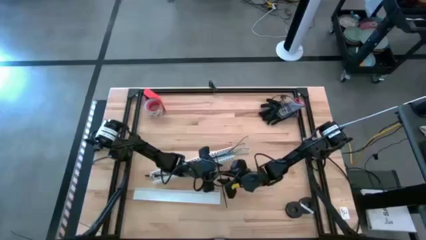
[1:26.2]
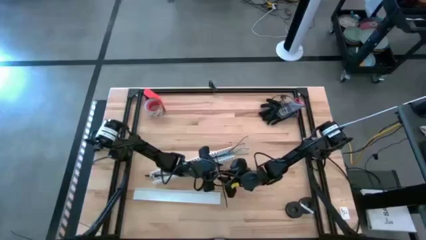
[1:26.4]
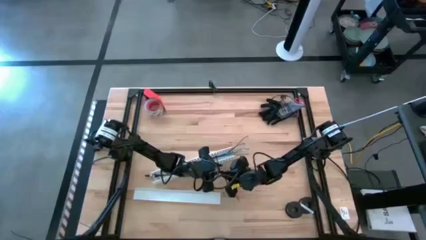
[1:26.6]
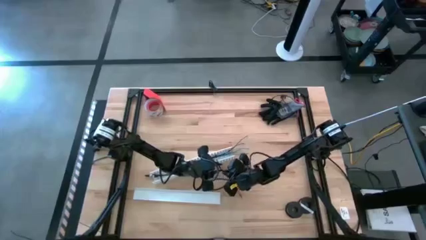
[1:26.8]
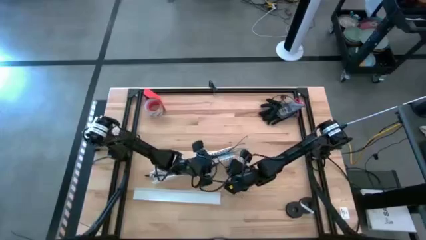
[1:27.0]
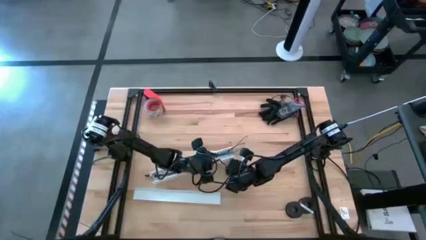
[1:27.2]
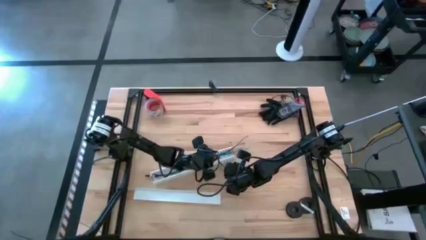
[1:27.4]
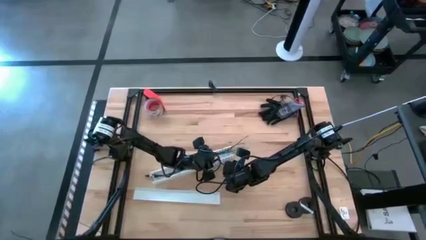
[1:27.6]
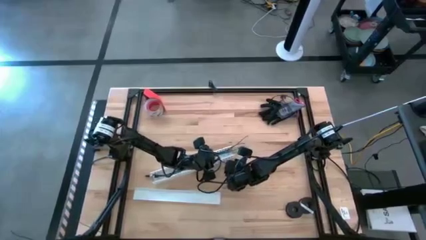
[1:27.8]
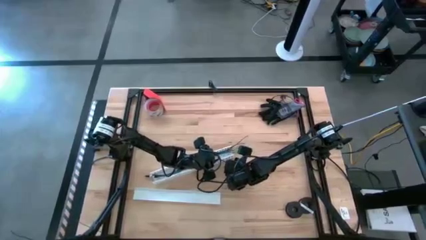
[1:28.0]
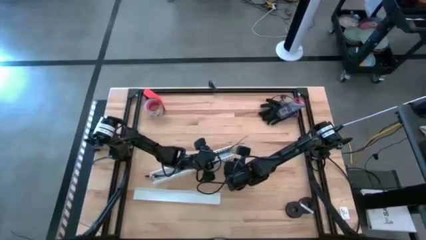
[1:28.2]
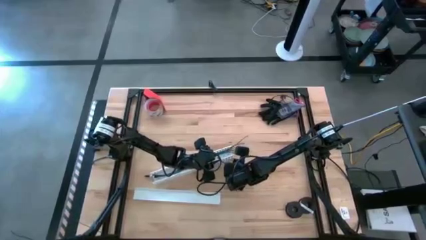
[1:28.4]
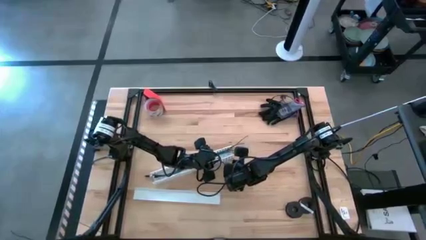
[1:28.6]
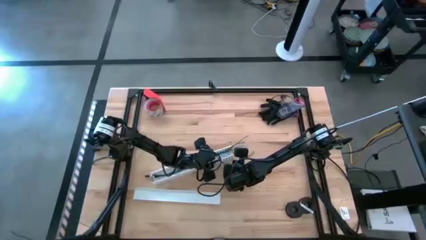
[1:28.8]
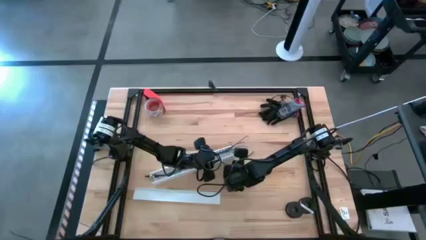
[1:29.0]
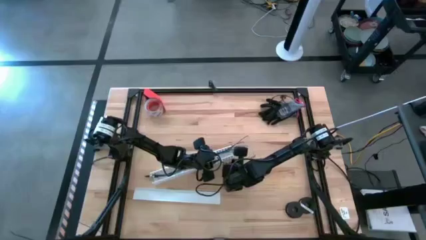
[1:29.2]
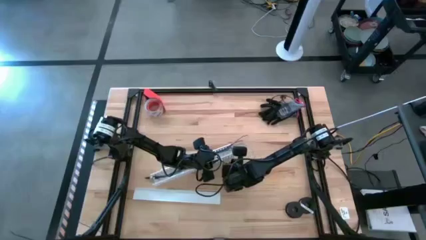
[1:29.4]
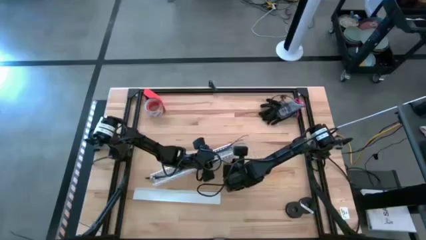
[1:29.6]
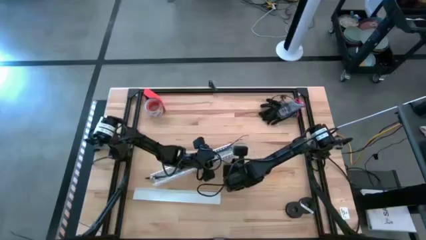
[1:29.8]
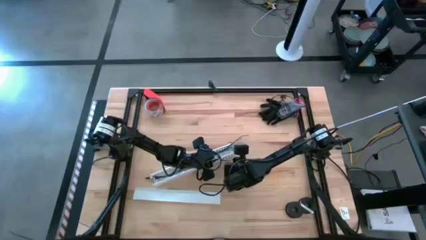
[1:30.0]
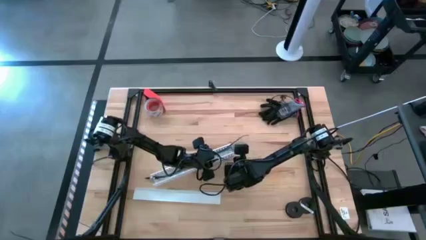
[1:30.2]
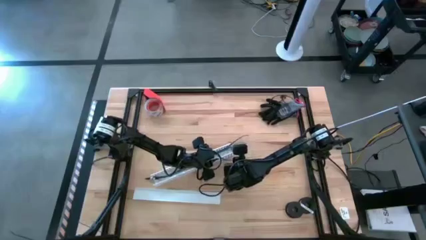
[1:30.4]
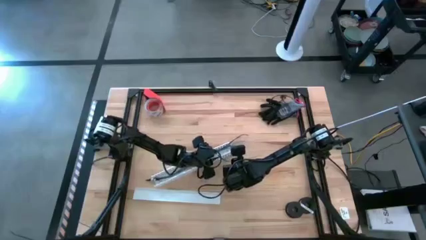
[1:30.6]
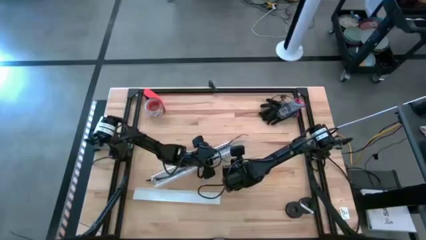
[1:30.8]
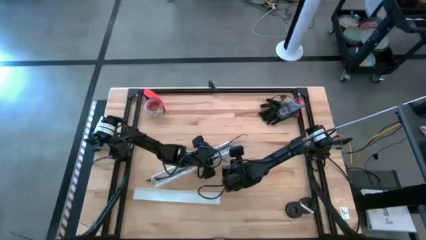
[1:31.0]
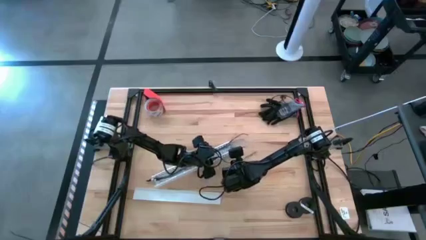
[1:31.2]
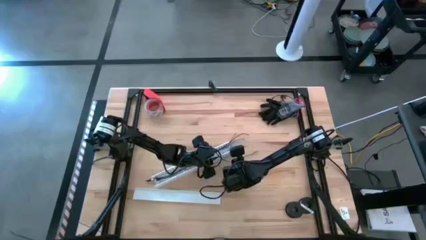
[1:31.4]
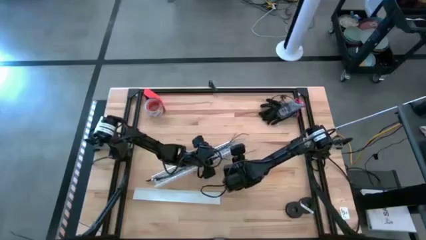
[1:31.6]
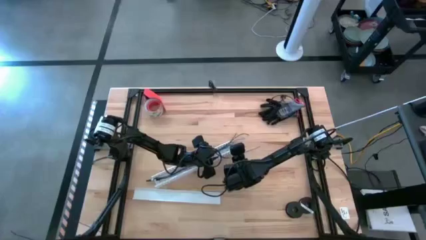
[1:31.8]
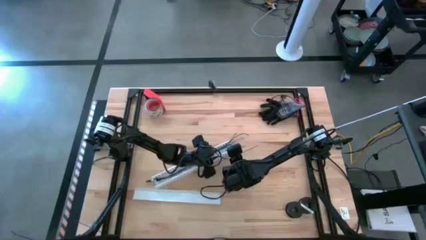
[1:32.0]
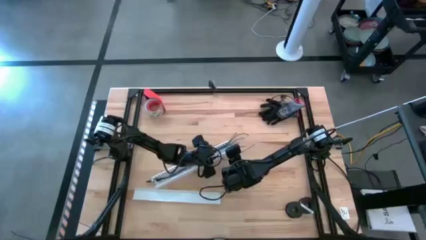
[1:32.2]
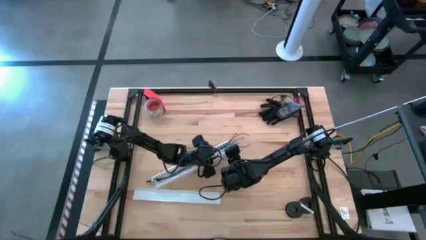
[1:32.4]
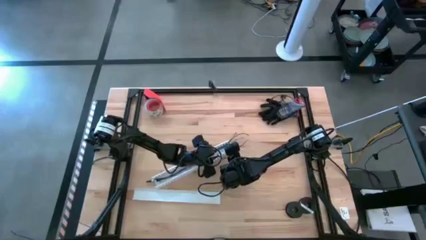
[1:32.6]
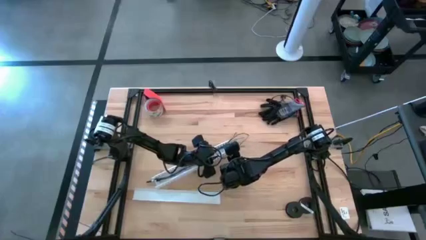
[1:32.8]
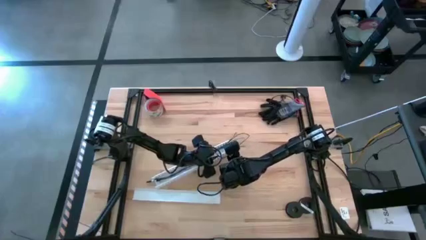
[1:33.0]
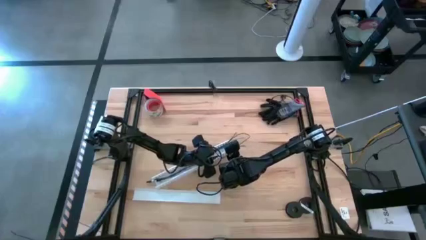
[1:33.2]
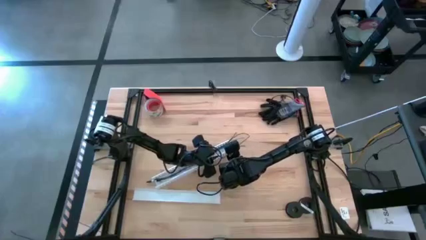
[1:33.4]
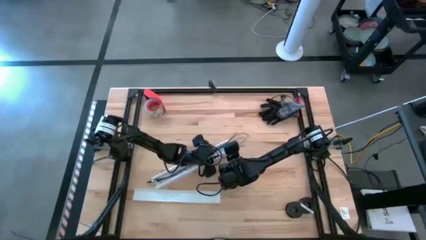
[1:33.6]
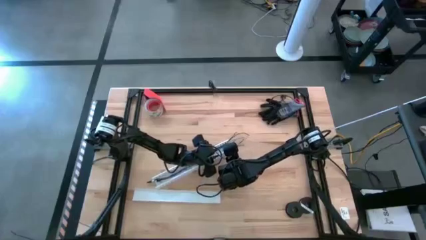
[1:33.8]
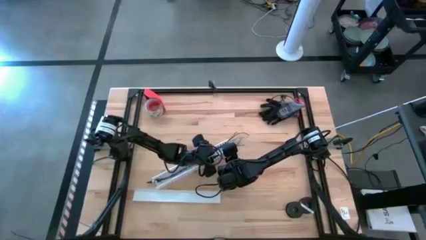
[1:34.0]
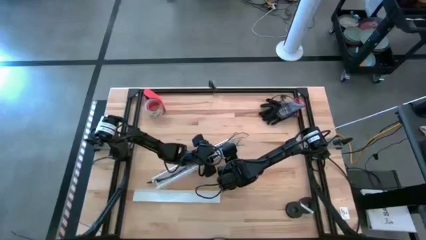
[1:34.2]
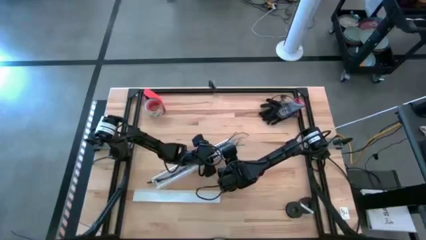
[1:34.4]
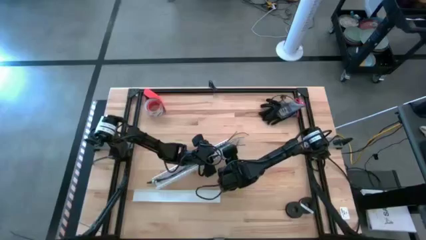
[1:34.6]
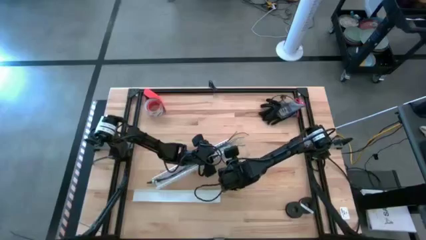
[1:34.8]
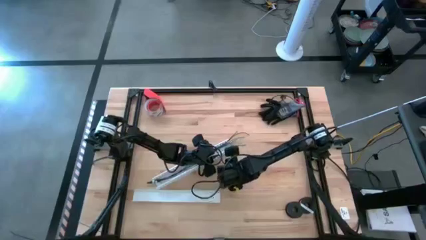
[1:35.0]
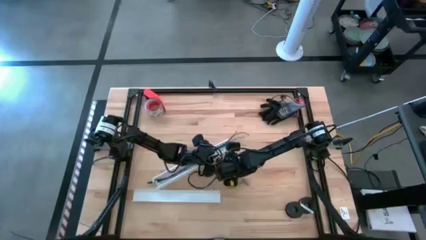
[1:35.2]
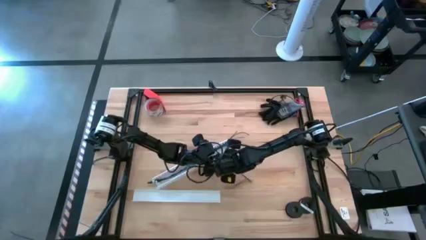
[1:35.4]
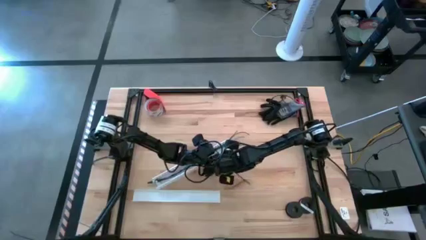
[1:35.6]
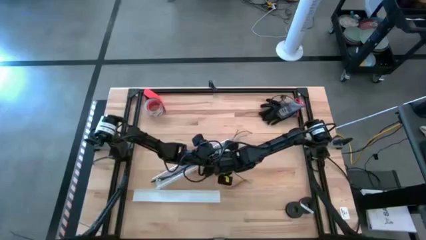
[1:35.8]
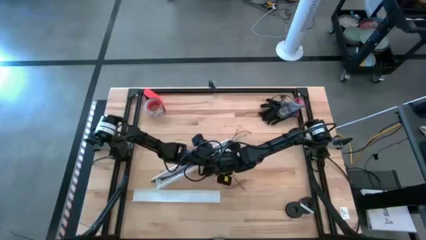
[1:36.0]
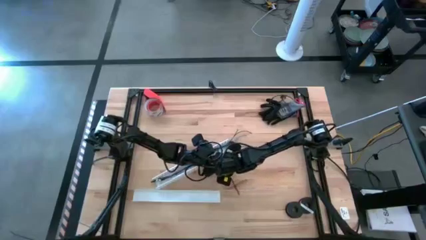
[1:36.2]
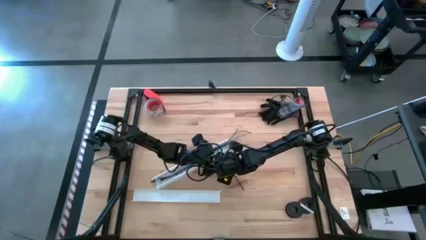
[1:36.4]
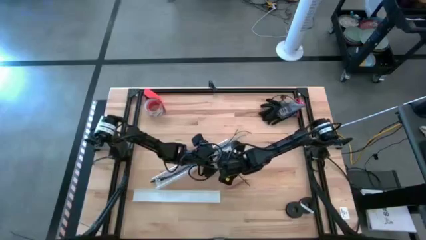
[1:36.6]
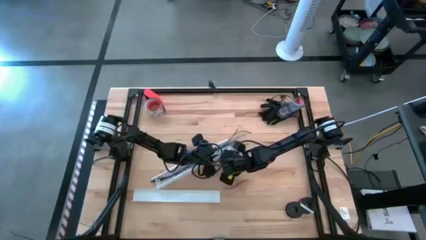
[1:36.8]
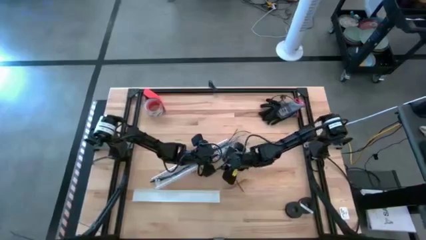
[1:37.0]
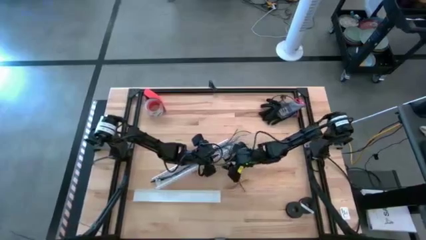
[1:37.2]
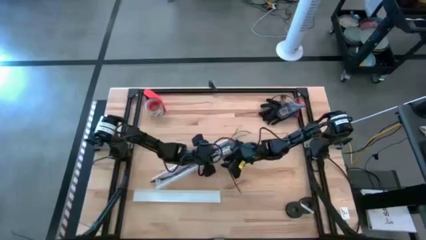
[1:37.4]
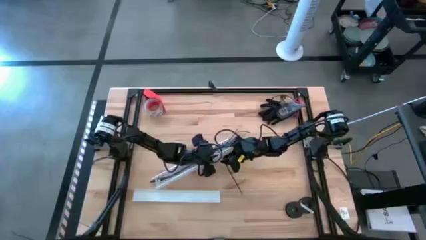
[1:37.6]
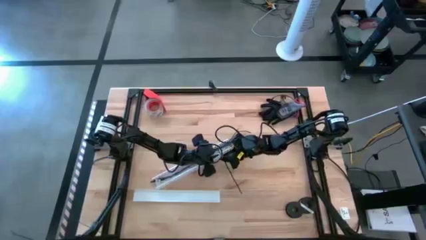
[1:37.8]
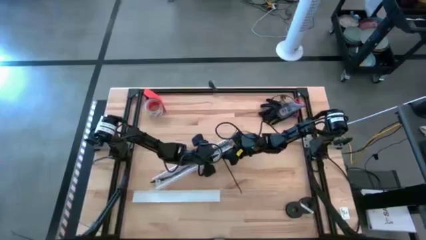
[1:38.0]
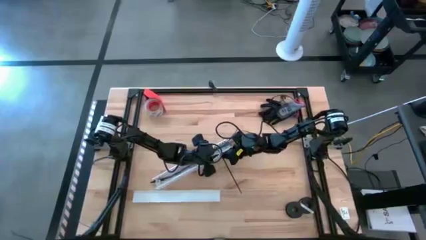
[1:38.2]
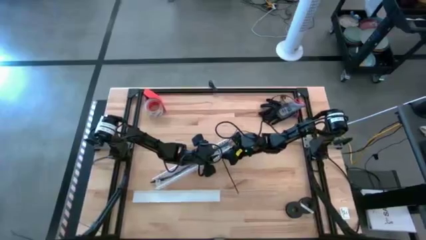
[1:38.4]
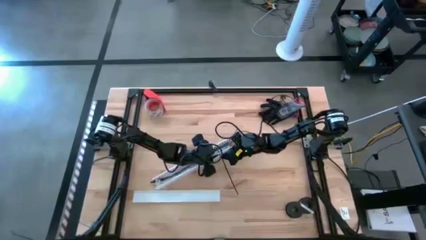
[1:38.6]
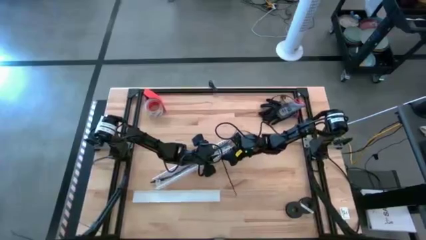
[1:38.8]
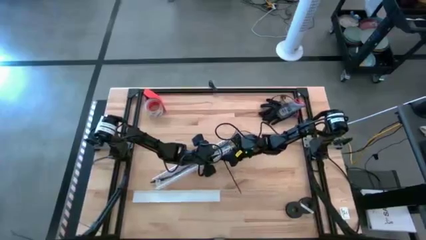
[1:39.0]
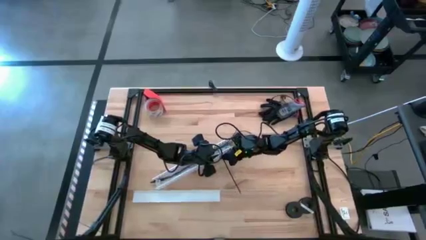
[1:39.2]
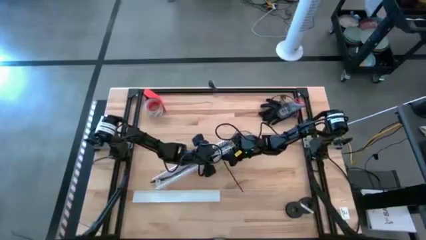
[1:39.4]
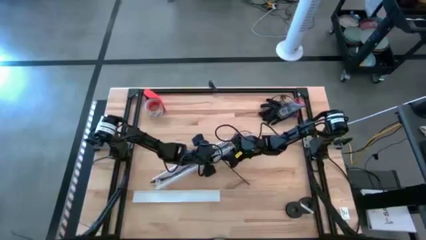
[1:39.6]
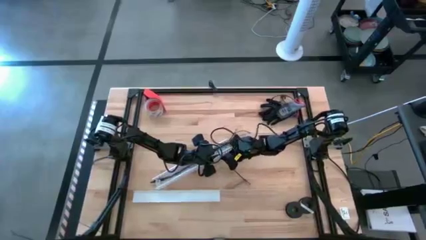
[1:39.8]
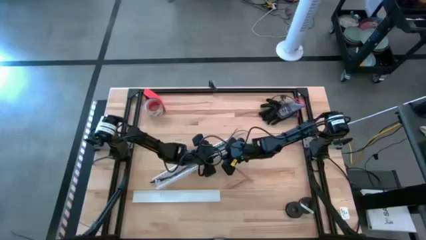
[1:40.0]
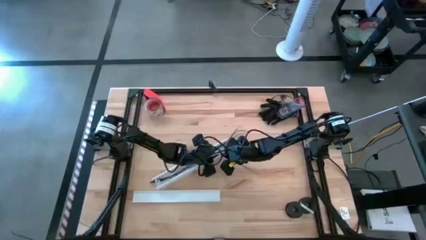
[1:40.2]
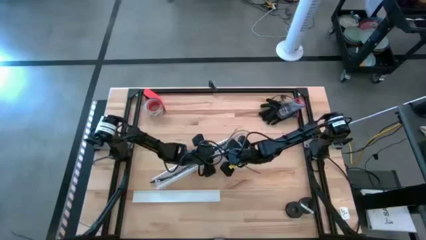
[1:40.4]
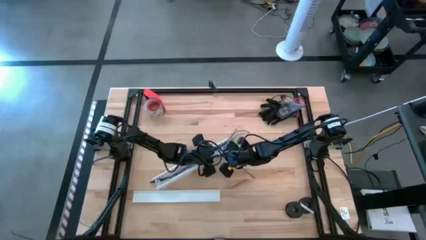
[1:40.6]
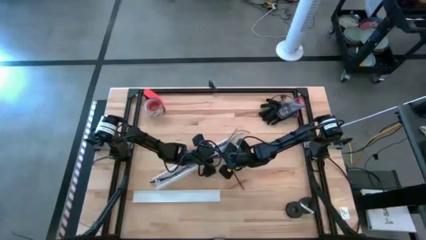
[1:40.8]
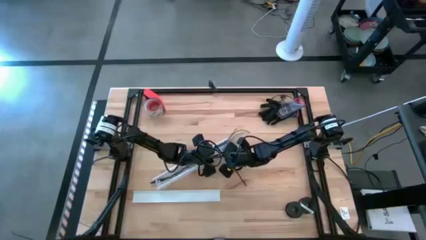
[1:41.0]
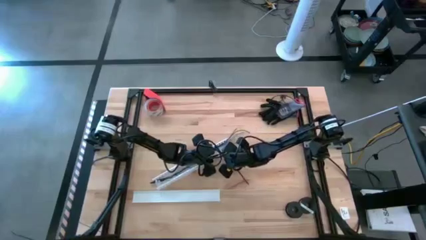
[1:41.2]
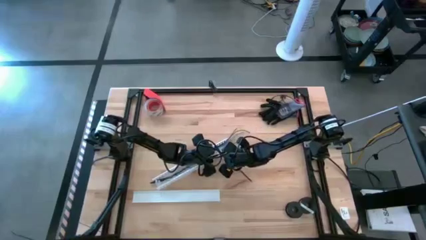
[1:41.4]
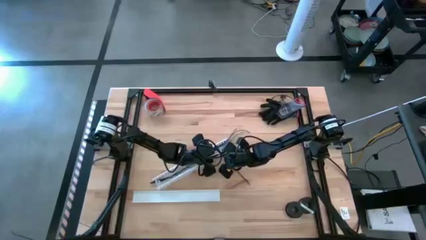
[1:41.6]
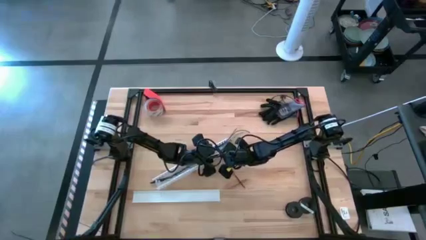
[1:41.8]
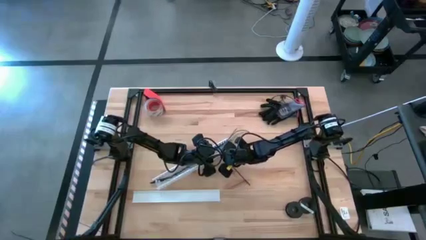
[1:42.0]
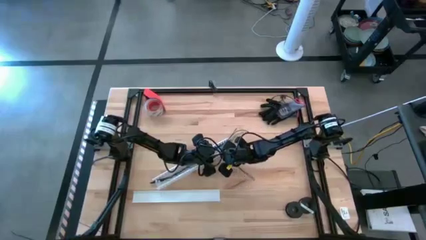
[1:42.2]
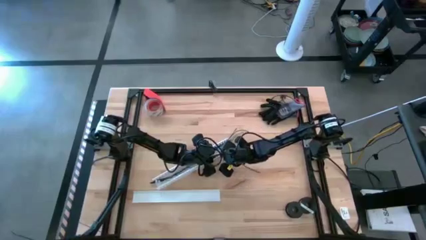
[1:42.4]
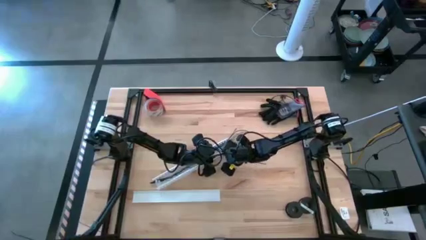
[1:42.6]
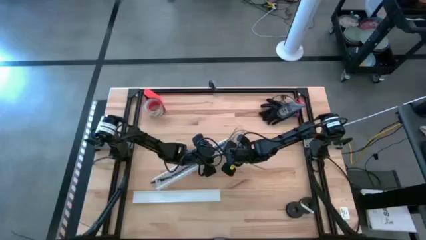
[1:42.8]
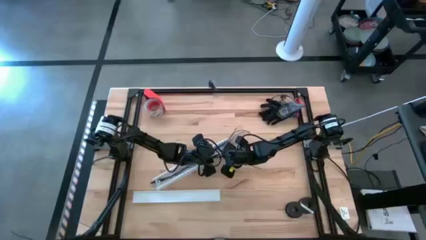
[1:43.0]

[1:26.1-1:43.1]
Task: Ziptie cables
Put the zip-tied cables in the cable duct
